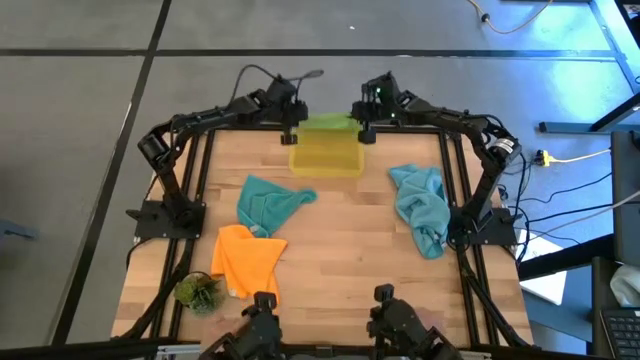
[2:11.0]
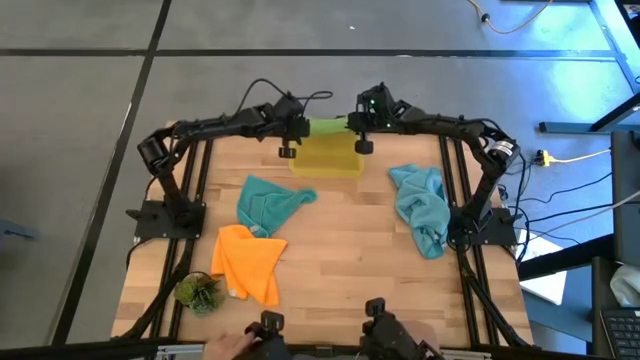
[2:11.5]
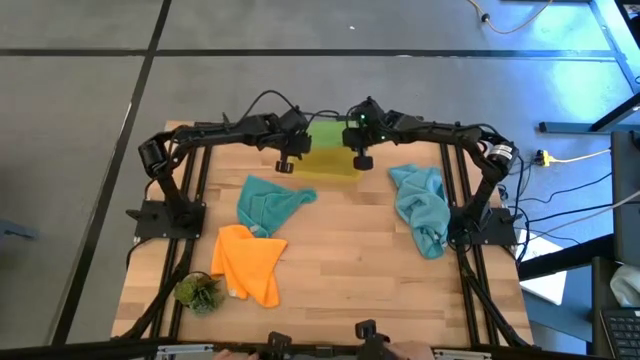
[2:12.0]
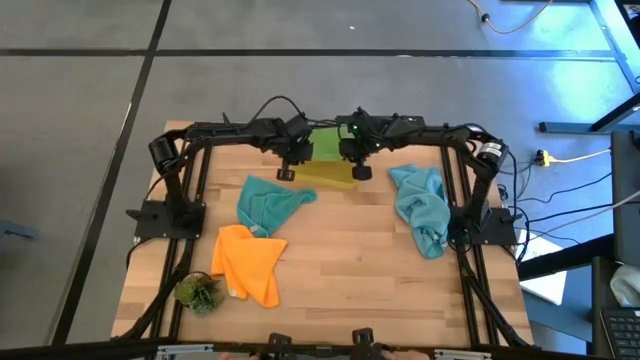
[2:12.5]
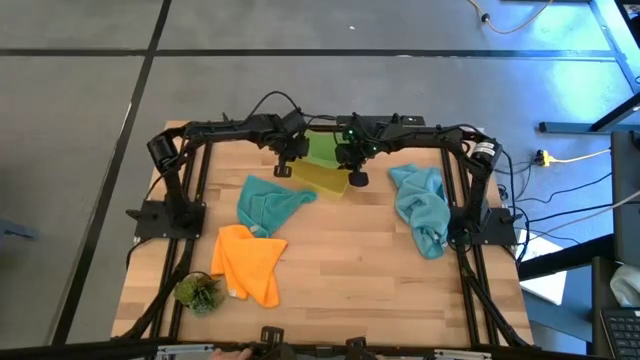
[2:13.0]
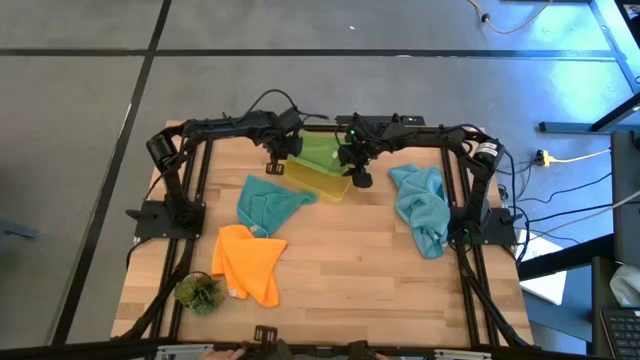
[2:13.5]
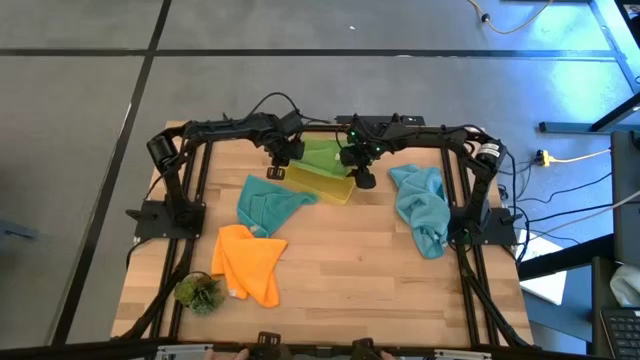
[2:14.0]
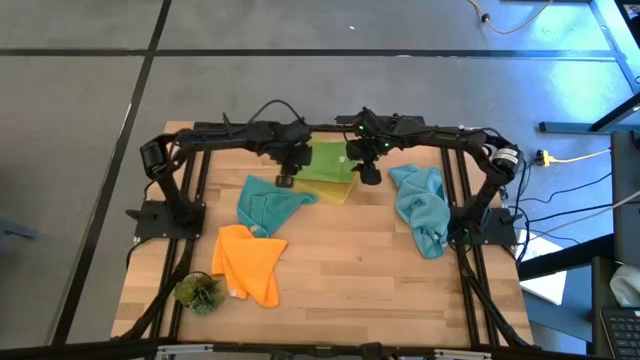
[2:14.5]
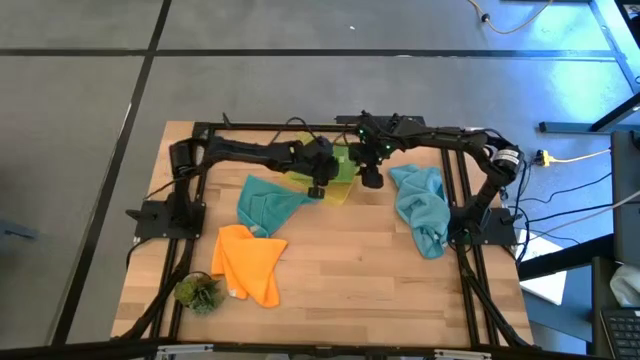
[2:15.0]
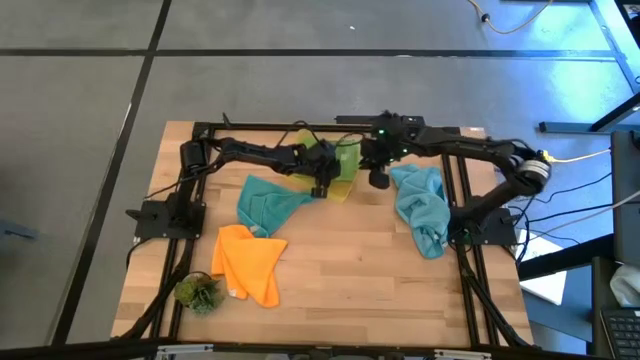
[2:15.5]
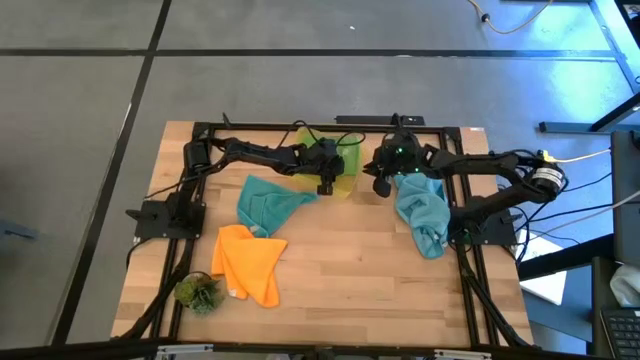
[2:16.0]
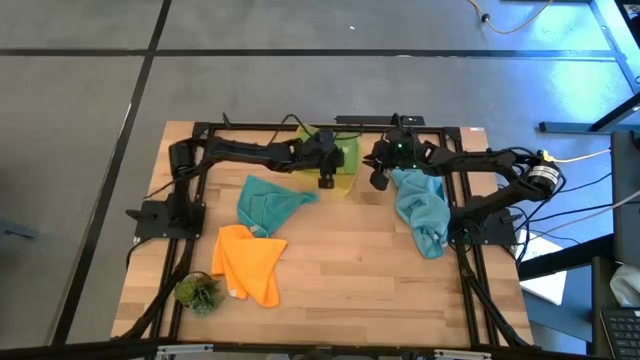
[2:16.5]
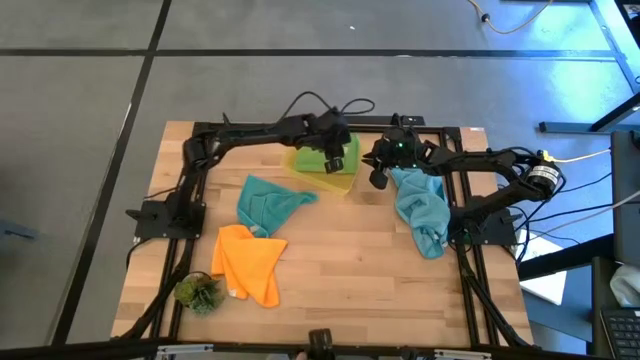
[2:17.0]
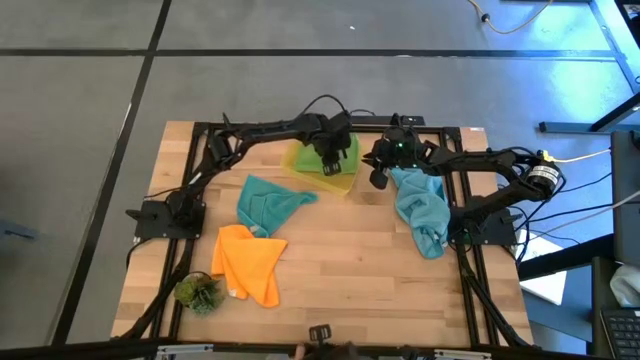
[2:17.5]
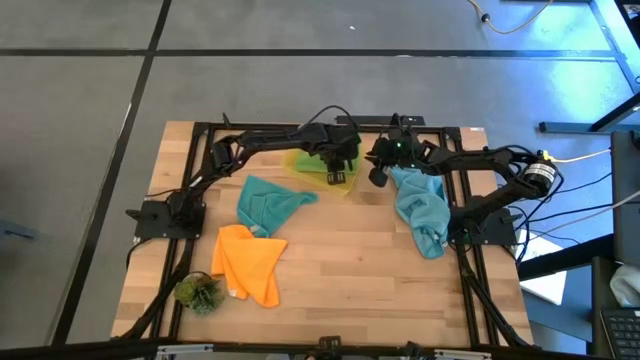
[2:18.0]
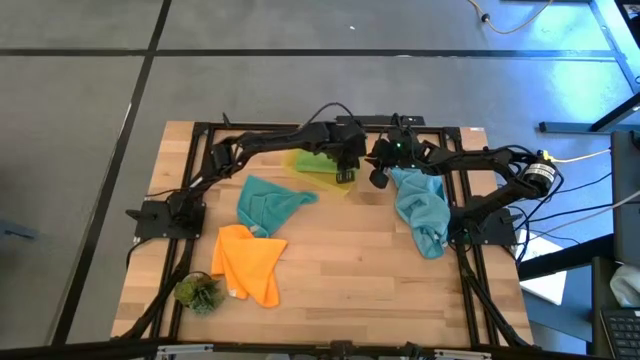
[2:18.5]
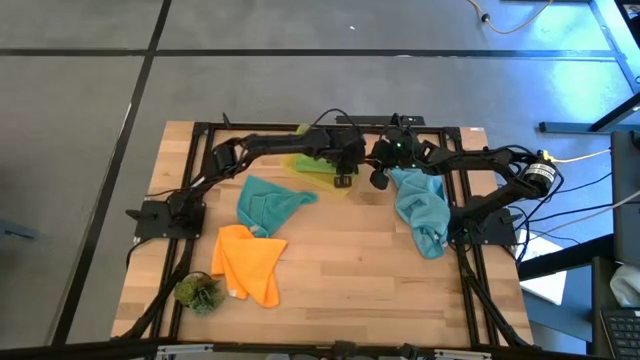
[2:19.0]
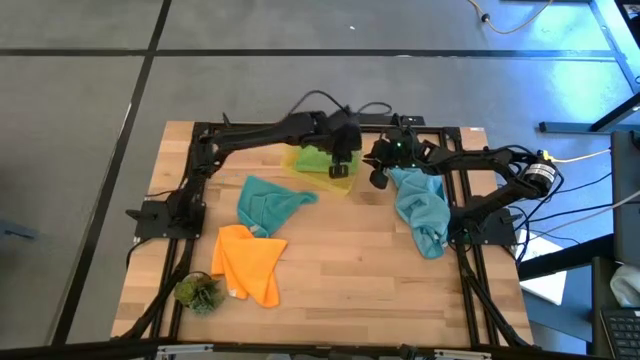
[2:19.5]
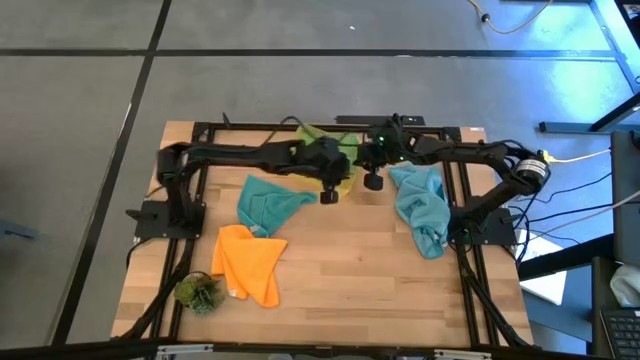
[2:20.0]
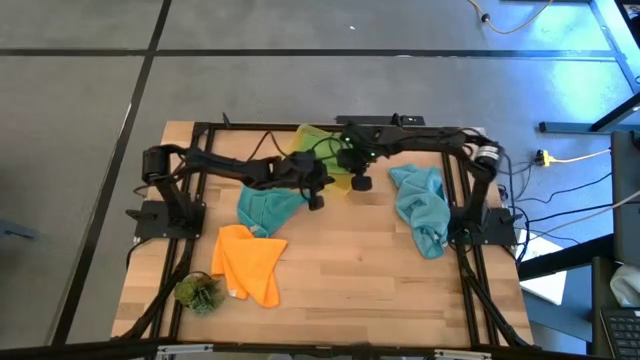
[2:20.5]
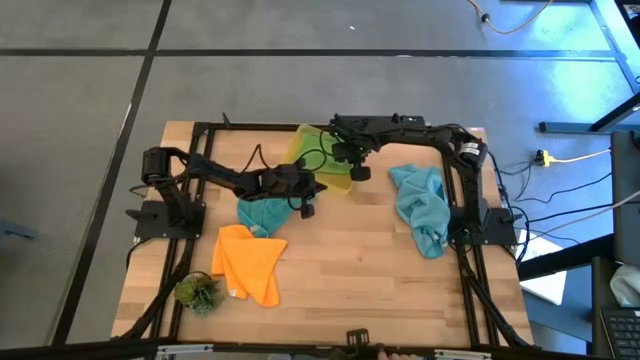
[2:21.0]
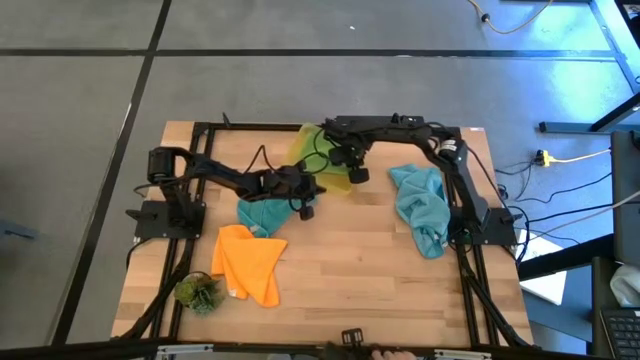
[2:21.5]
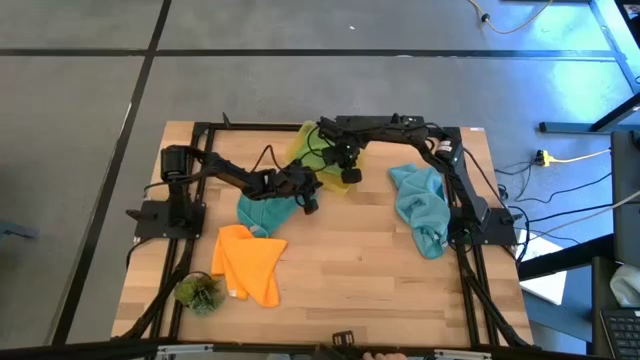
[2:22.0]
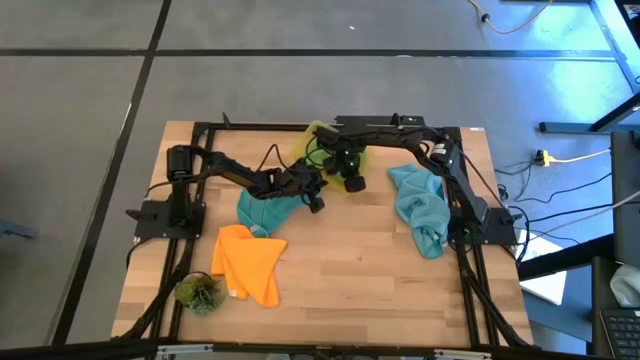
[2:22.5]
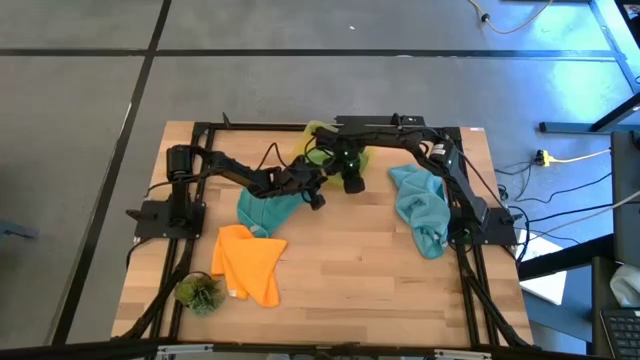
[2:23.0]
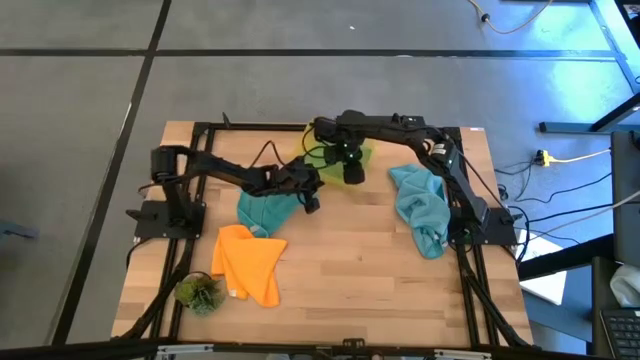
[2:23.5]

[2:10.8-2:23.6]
Task: Fold microfiber towels
Put the green microfiber cloth into the yellow bin

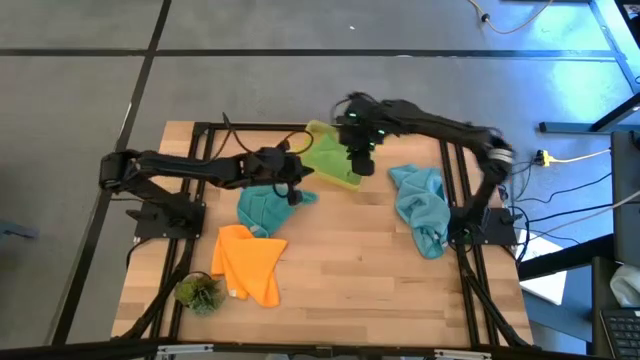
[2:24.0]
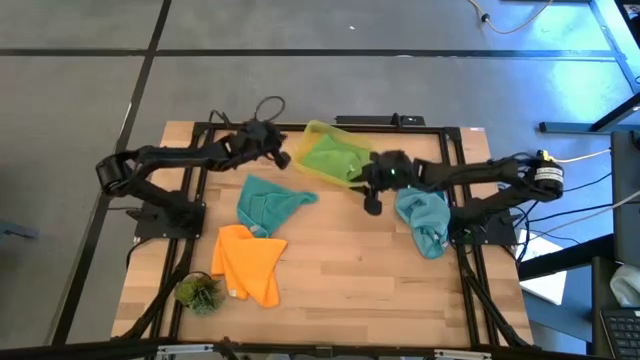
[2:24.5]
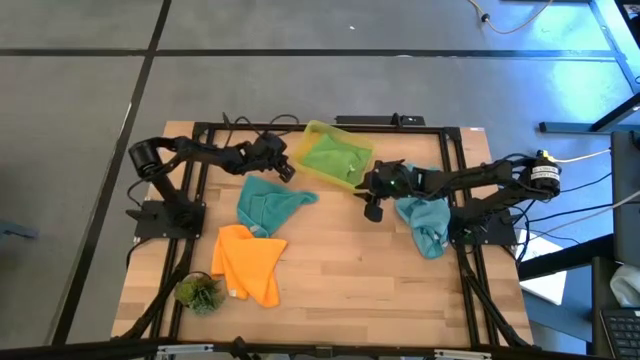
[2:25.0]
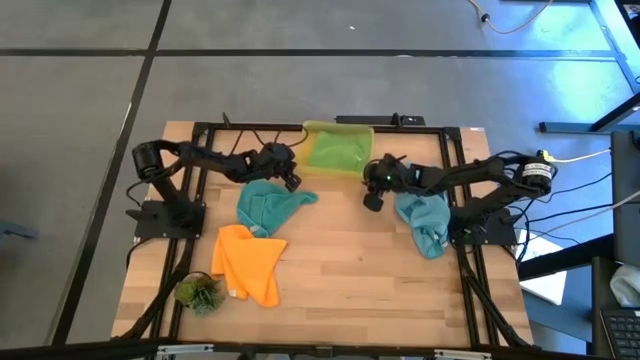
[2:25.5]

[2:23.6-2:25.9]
Adjust the yellow bin

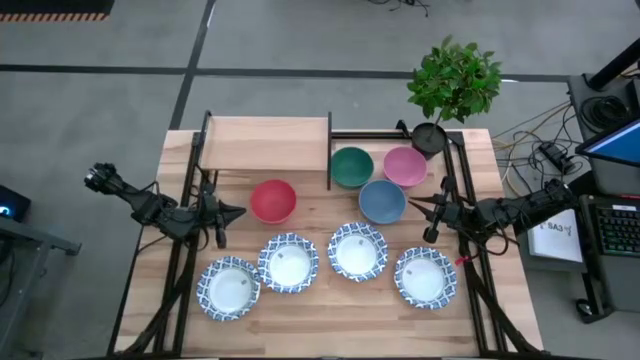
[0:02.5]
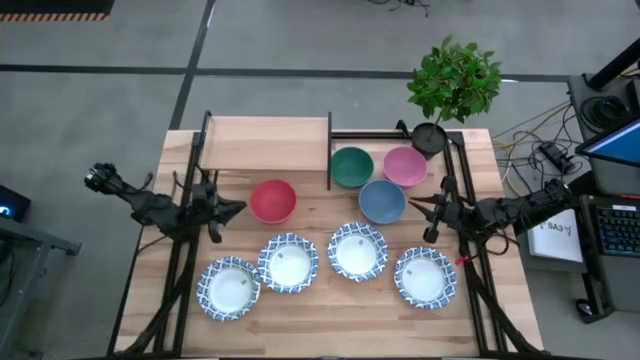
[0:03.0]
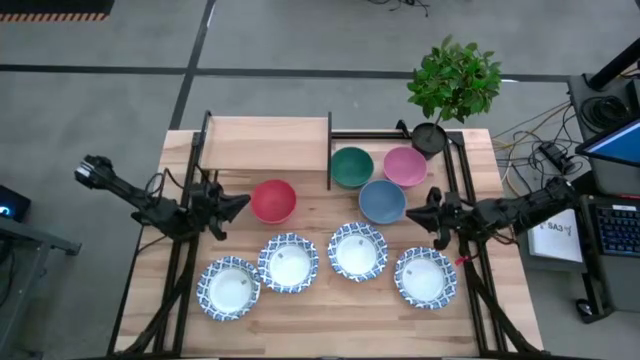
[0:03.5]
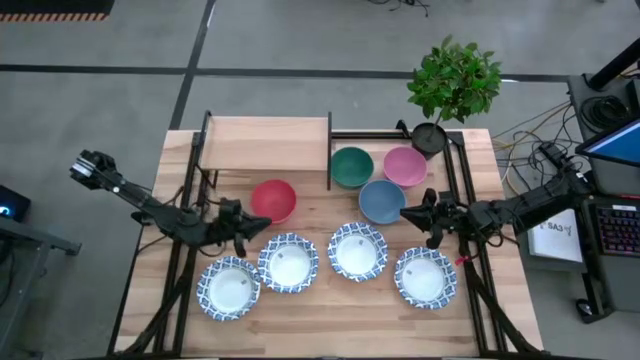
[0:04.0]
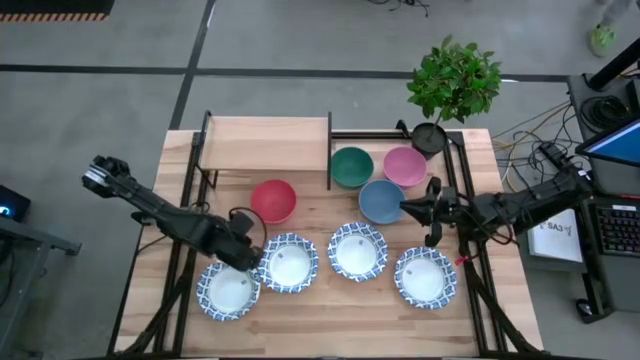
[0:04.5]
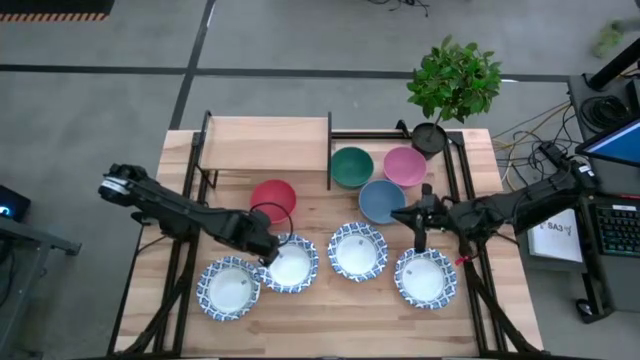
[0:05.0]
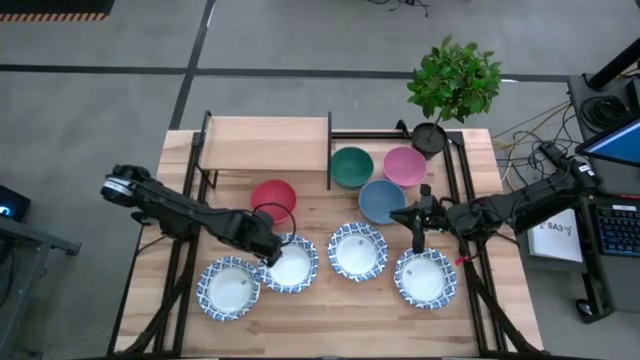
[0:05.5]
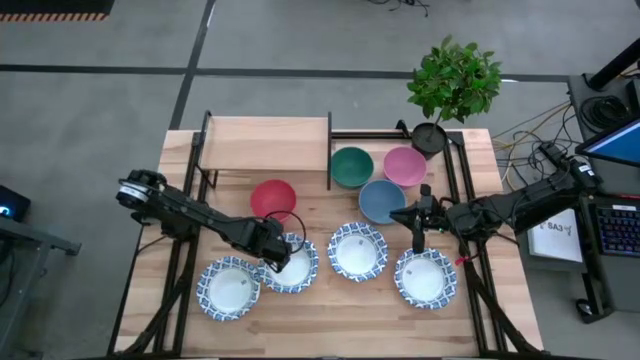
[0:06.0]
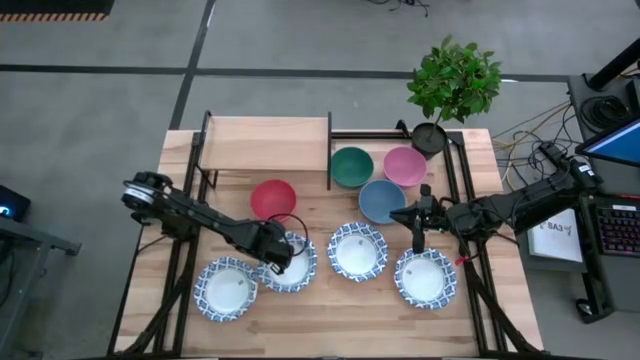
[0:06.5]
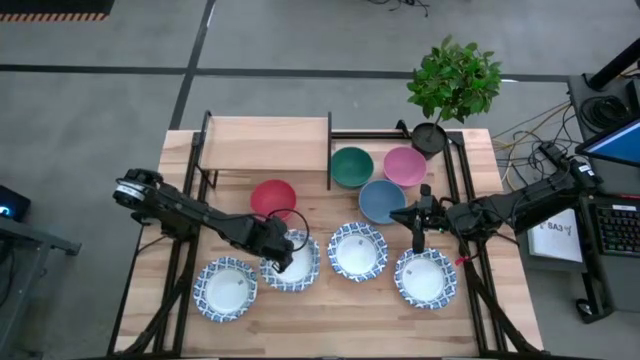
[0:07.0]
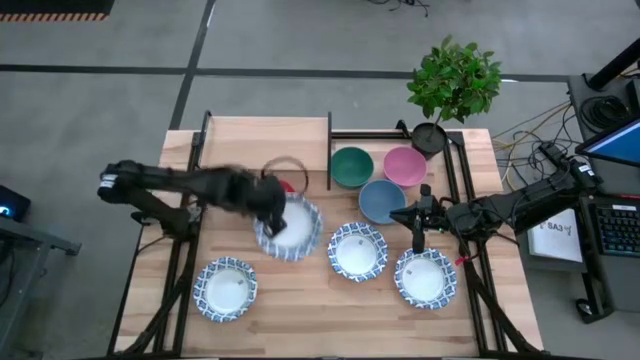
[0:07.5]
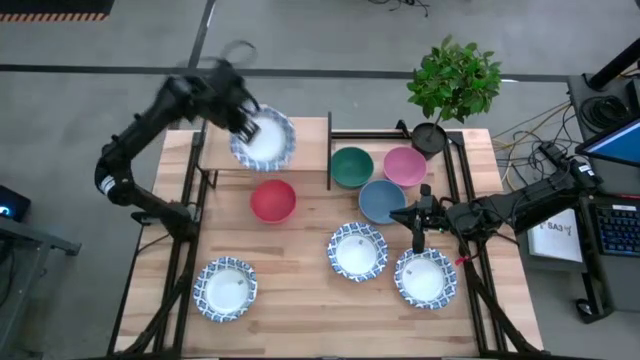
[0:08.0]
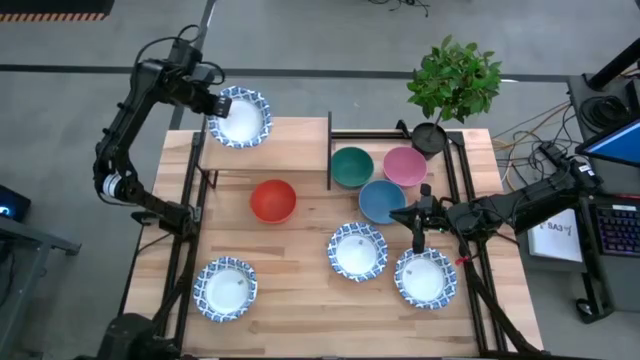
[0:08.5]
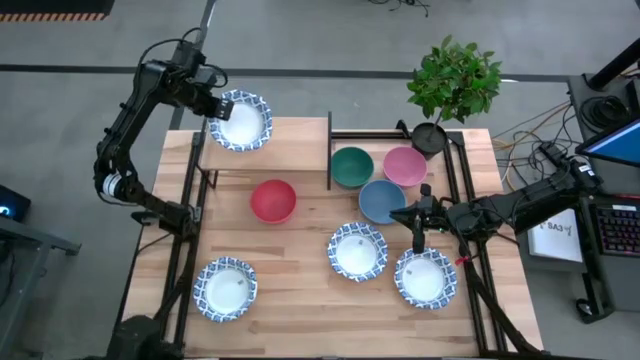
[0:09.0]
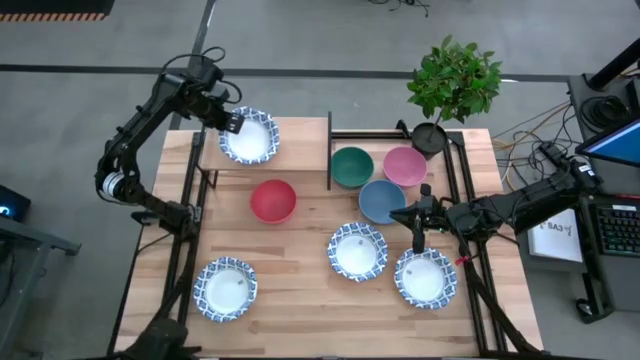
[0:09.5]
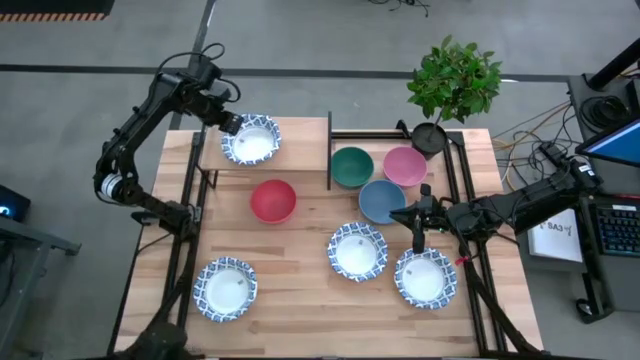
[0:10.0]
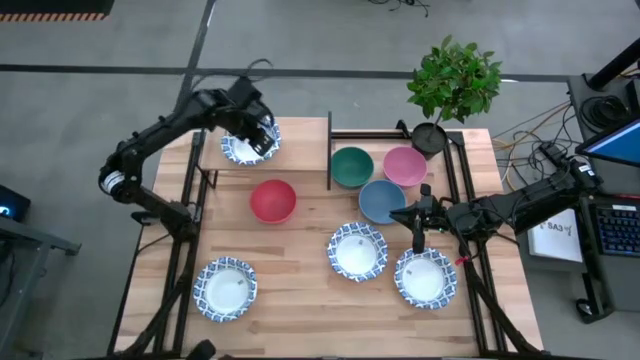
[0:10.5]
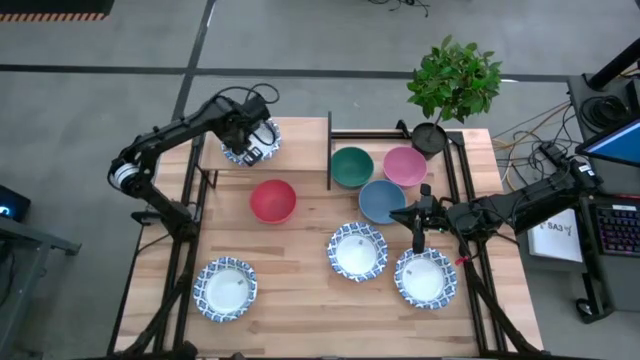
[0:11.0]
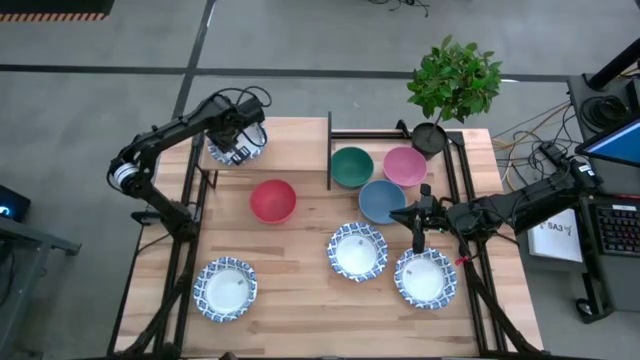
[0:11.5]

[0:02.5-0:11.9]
Task: Place and stack bowls onto a shelf
Put the top left white and blue bowl on the shelf
